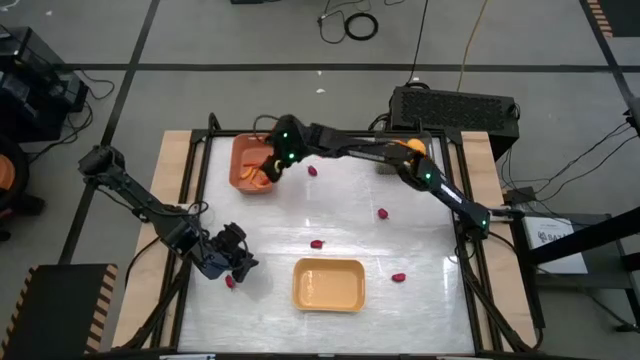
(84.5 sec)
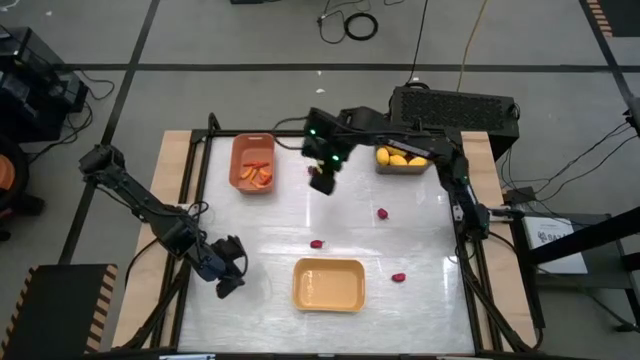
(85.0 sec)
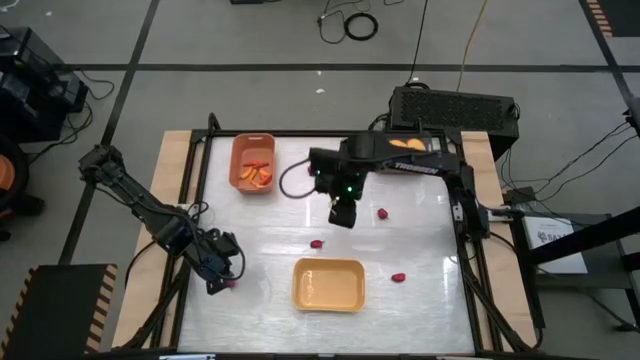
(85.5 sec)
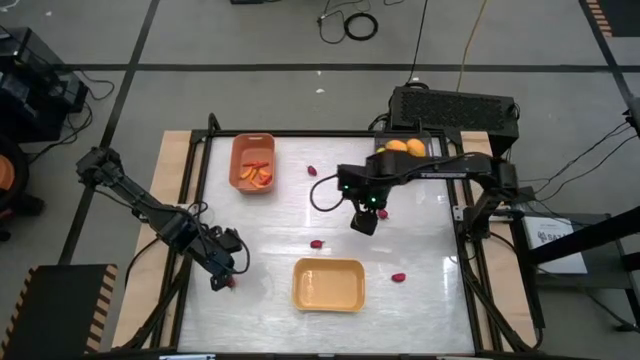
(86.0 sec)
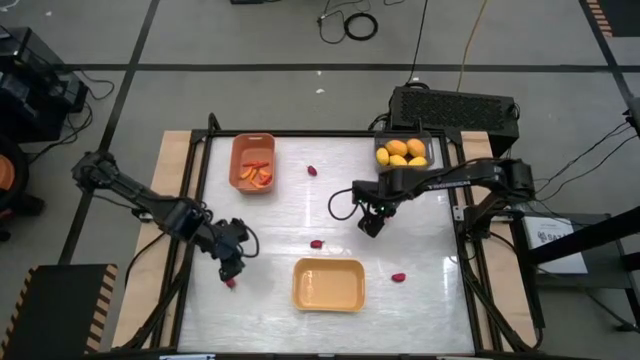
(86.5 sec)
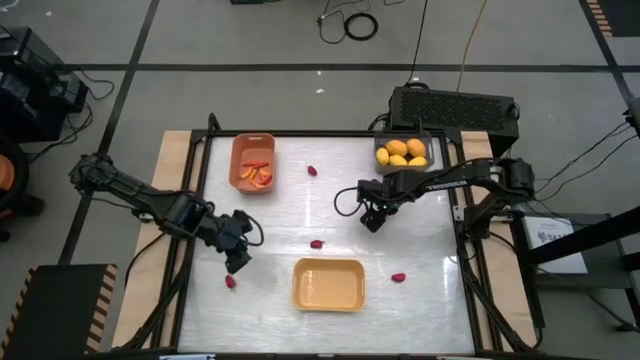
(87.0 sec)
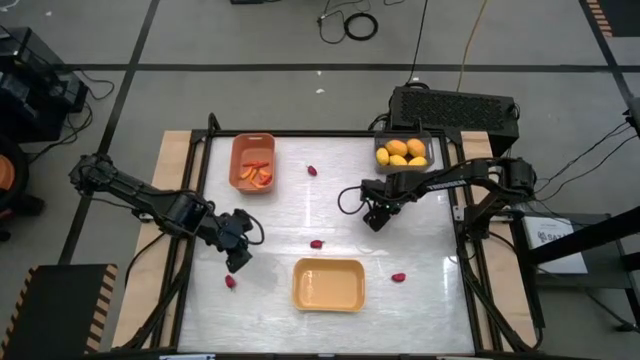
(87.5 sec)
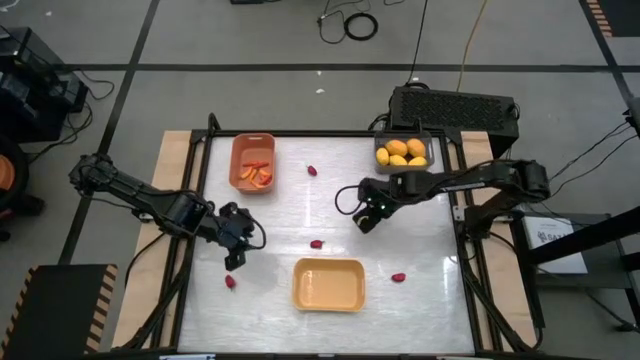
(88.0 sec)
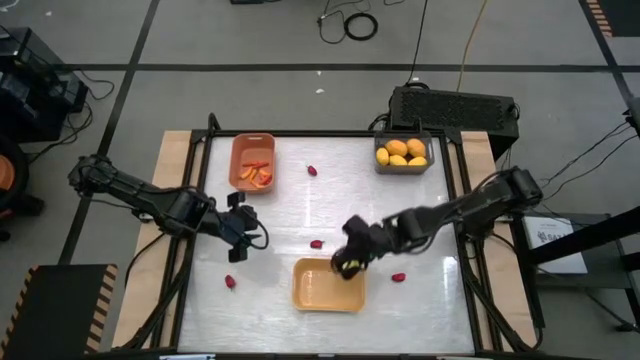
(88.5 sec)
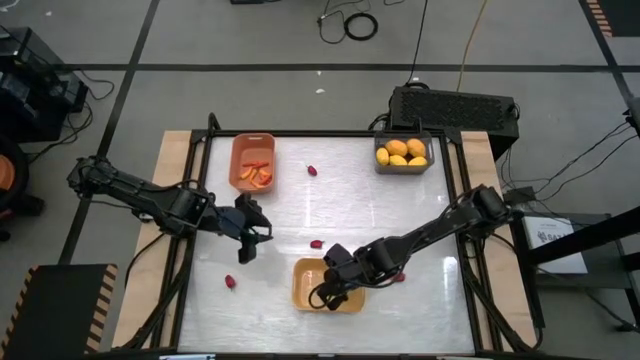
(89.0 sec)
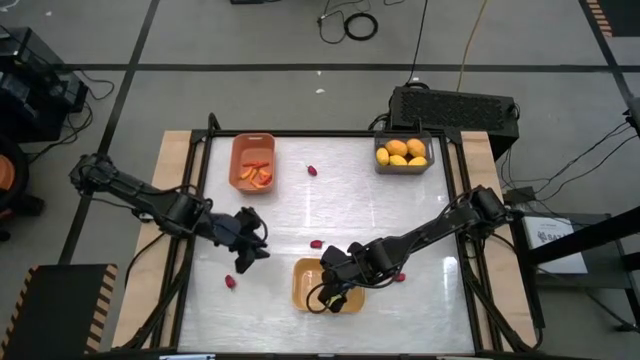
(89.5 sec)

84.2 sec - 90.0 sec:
Task: Sort produce into baskets
Put the red bell pepper into the yellow bin

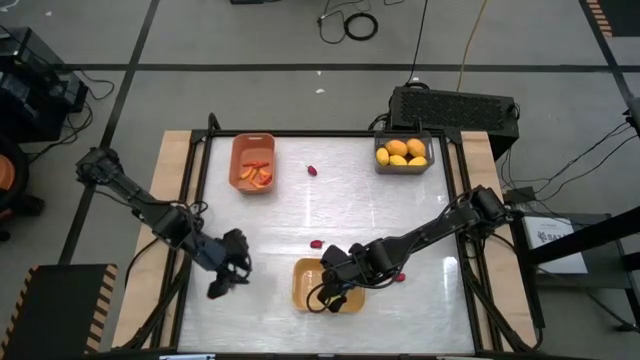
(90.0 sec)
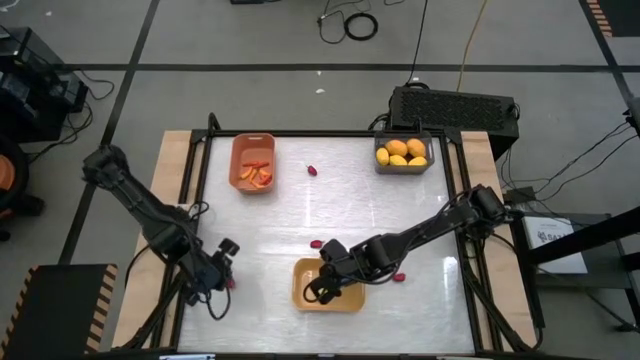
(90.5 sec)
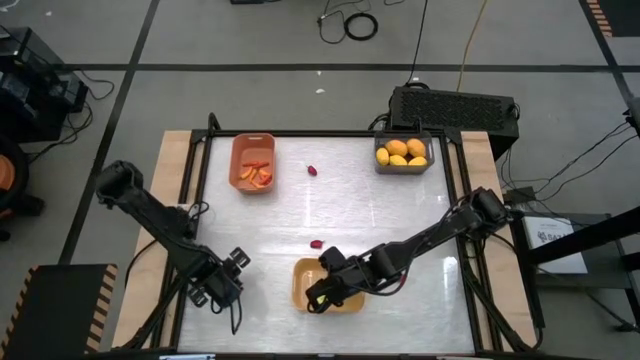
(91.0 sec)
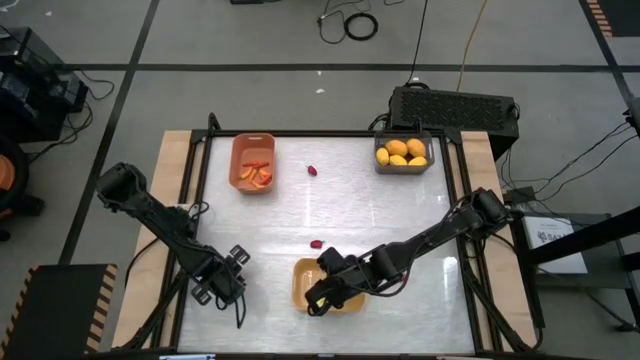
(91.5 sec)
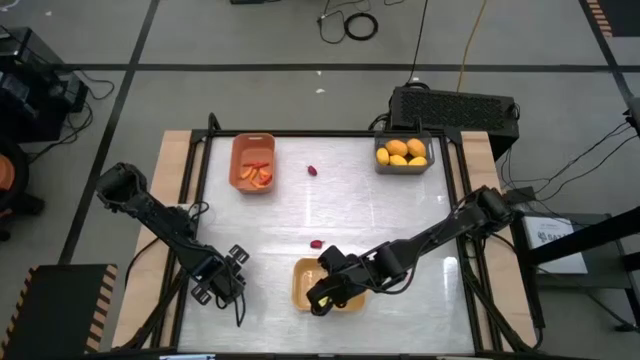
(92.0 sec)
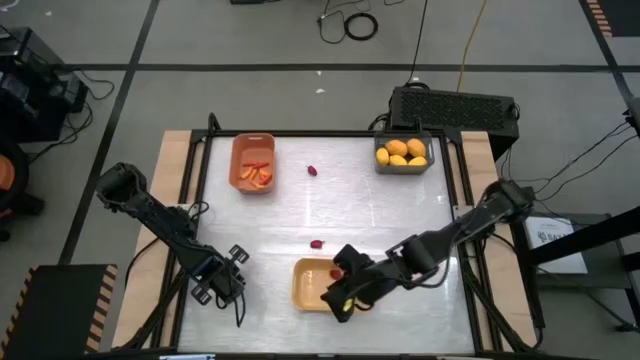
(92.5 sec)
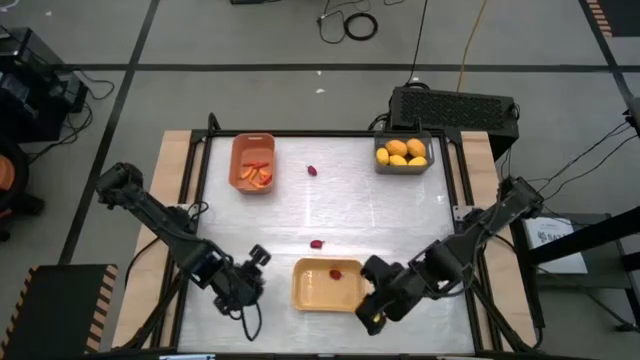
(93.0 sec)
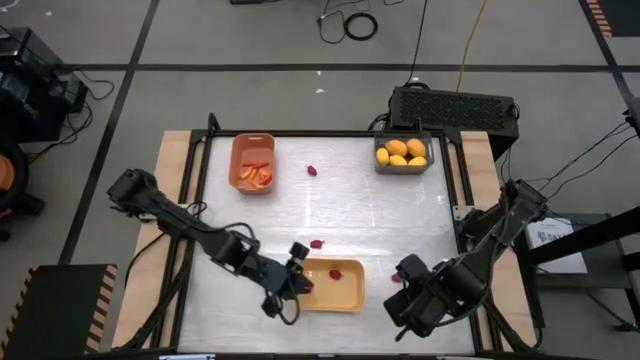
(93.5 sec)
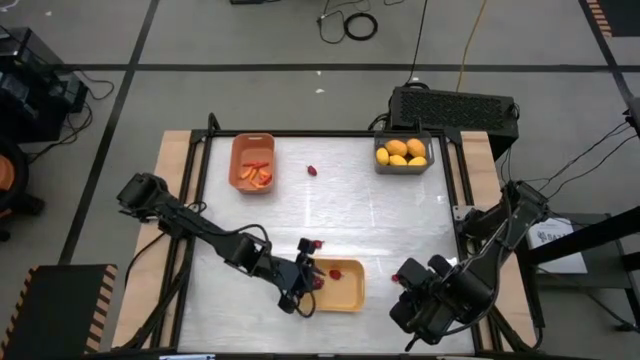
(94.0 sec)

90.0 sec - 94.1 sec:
Put the red bell pepper into the yellow bin

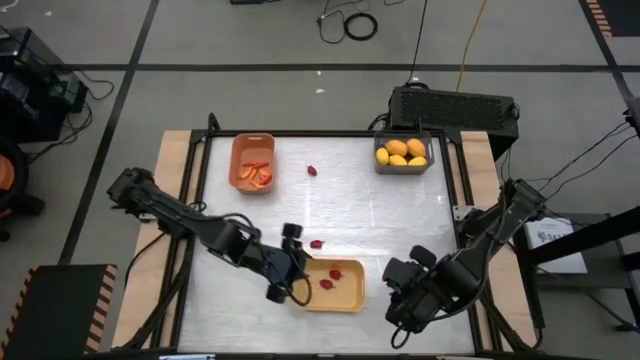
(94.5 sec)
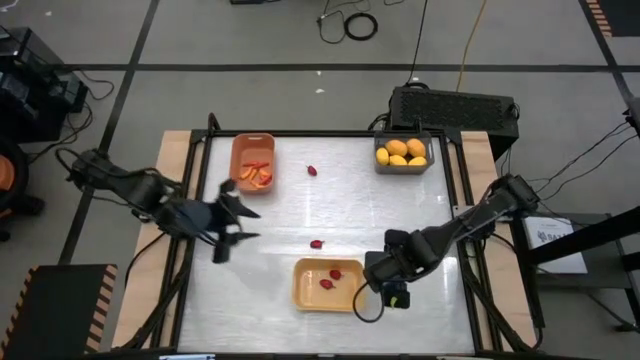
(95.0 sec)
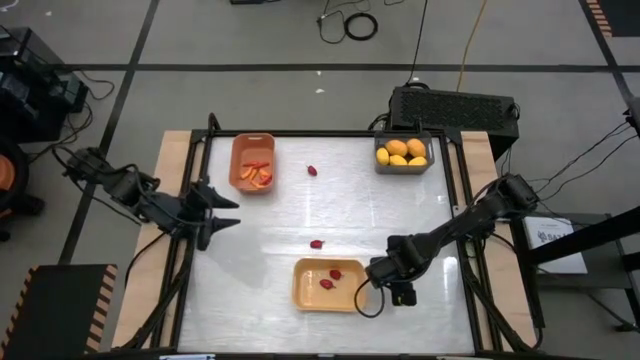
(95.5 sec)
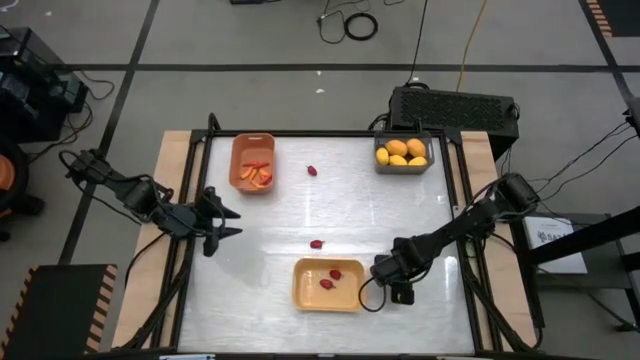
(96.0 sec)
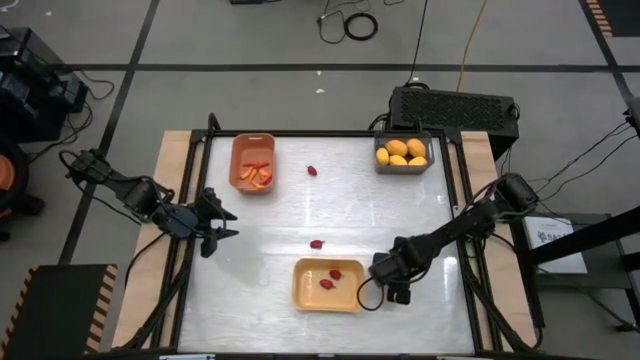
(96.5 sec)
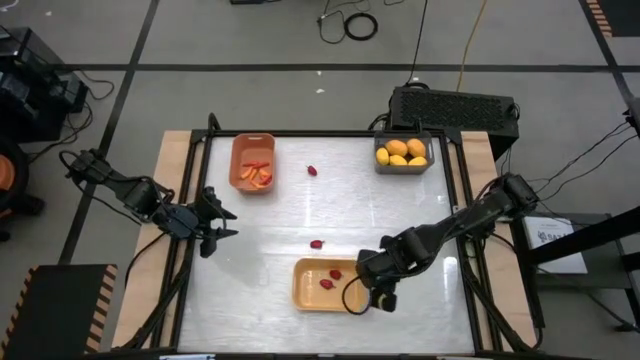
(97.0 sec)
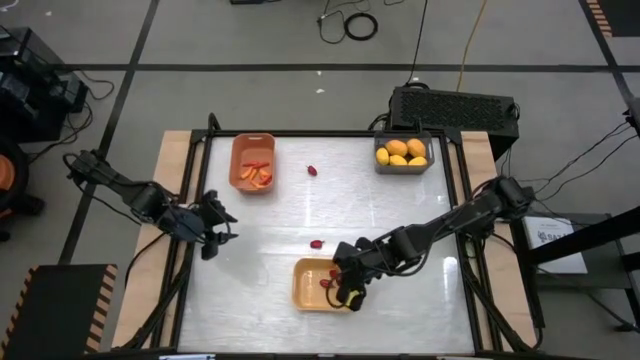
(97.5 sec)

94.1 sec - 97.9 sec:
Put the red bell pepper into the yellow bin

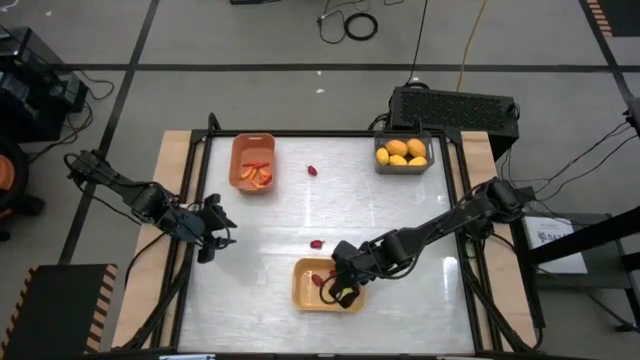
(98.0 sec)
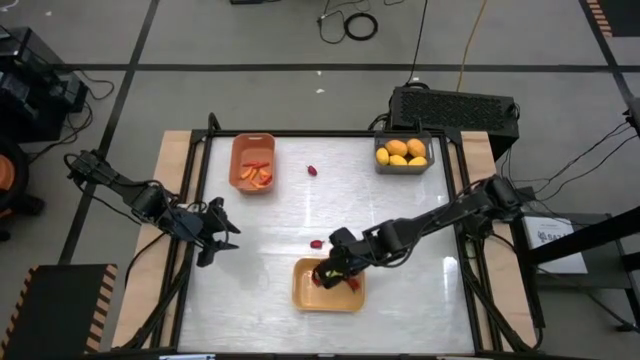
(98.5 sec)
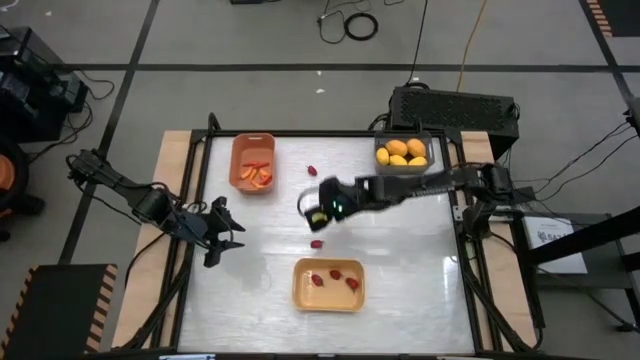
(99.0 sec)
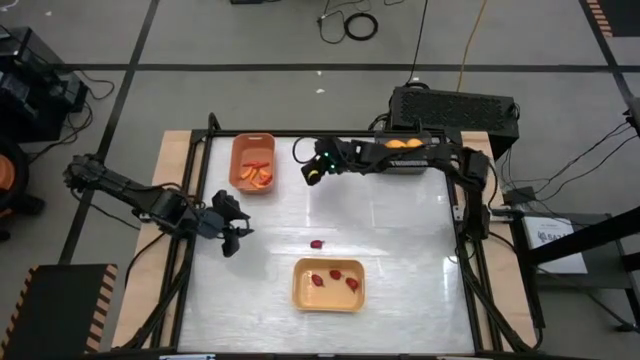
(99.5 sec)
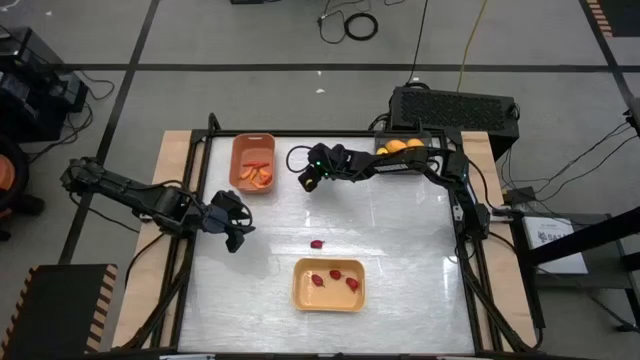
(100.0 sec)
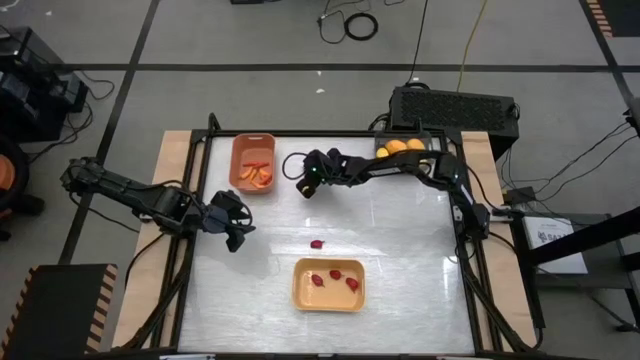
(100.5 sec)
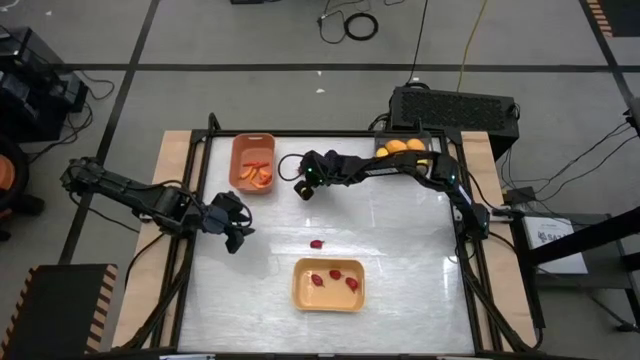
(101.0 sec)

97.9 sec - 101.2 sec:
Put the red bell pepper into the yellow bin

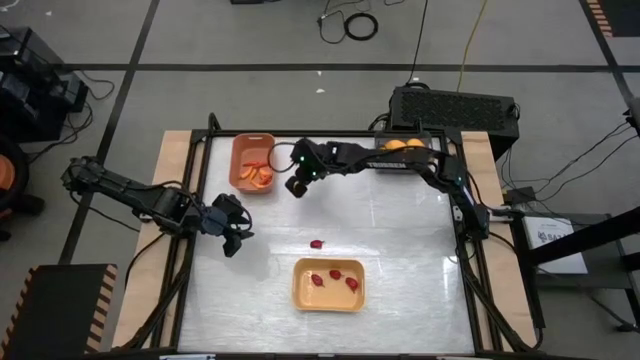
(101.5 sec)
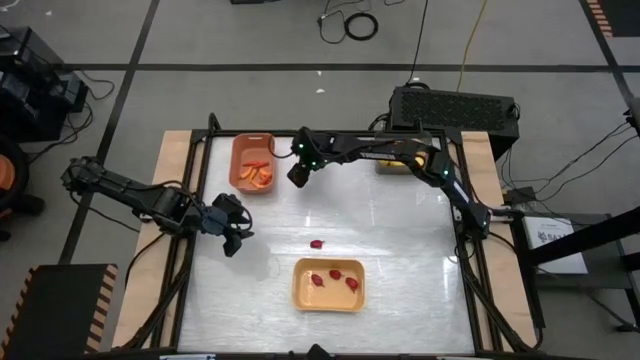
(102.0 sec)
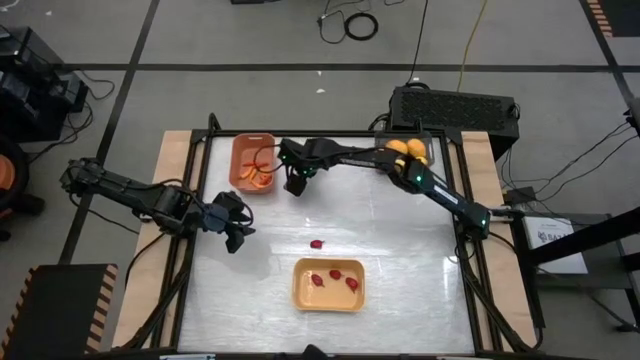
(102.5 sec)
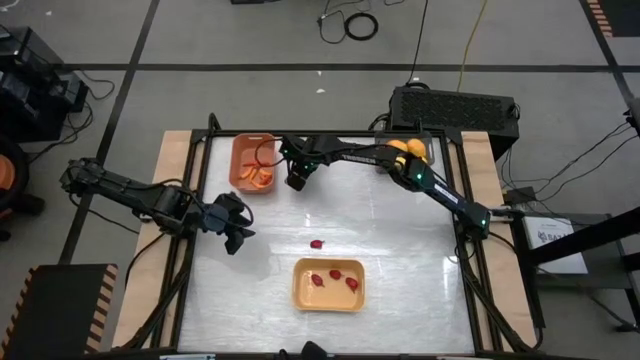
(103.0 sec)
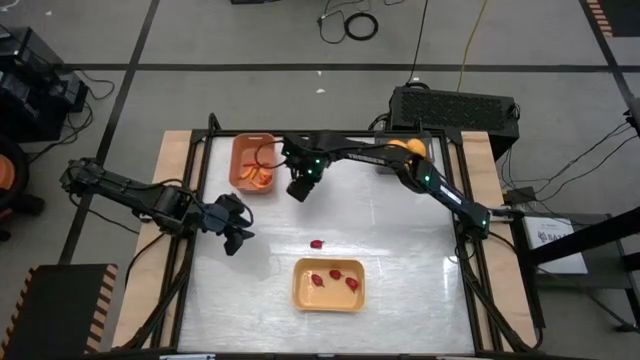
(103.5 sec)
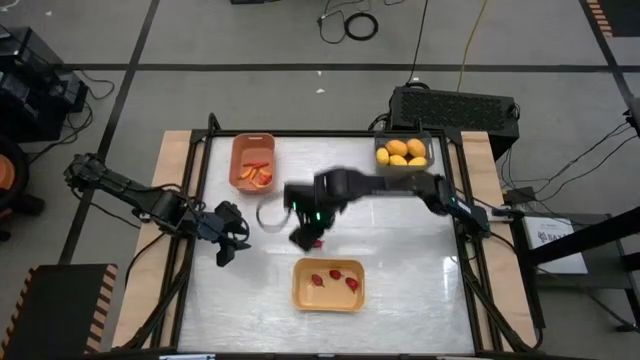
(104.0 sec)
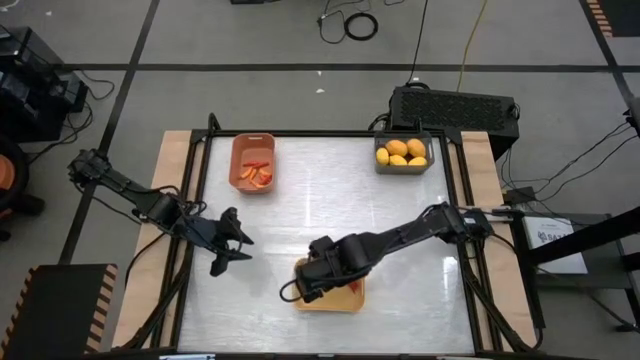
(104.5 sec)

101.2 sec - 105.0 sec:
Put the red bell pepper into the yellow bin

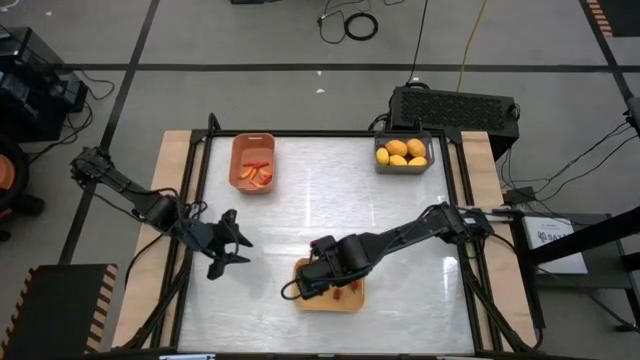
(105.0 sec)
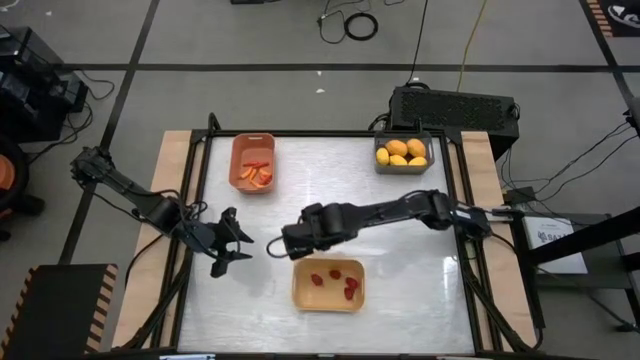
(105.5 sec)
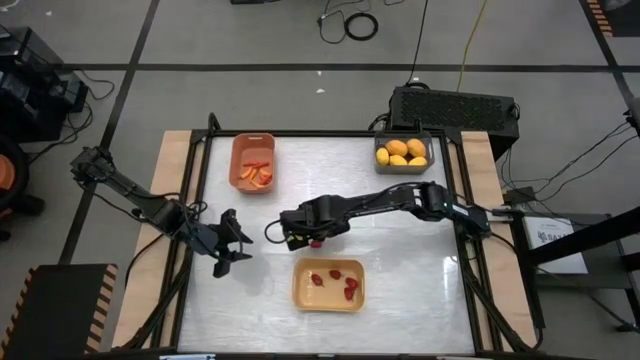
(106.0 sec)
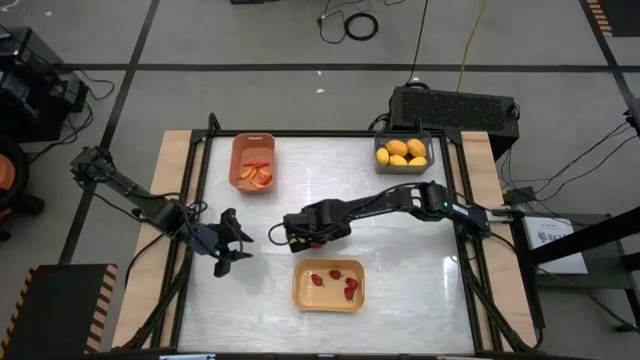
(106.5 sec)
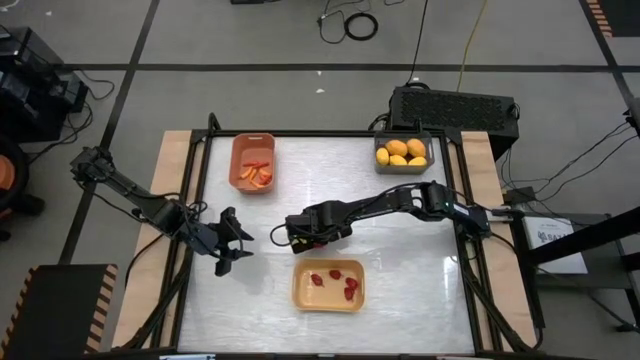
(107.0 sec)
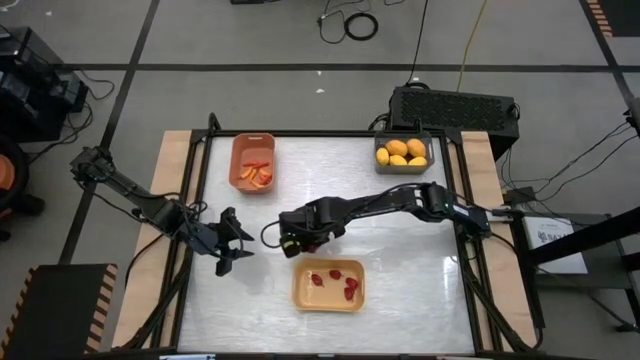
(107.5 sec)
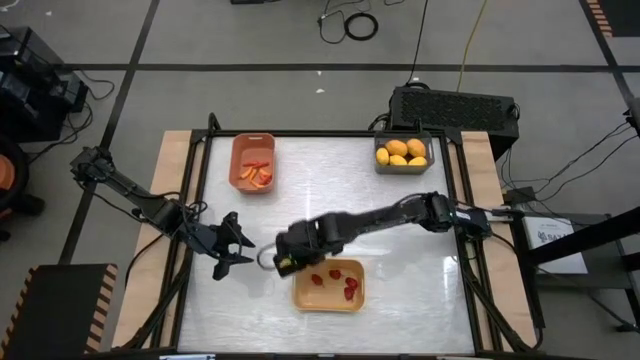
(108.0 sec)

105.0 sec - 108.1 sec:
Put the red bell pepper into the yellow bin
